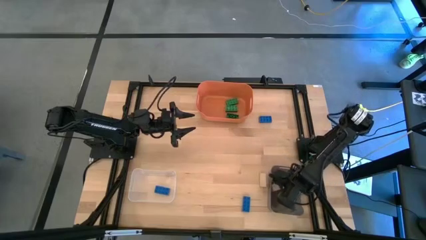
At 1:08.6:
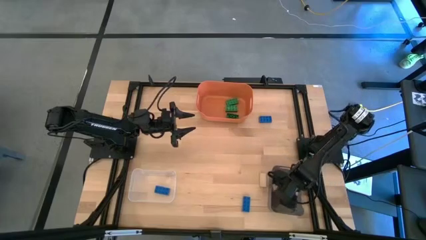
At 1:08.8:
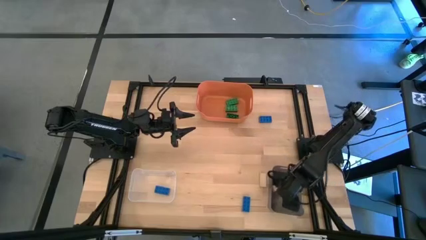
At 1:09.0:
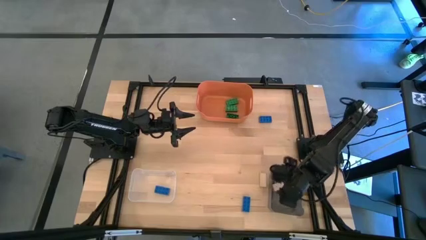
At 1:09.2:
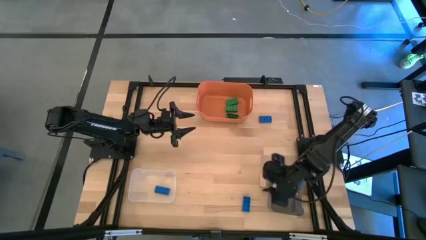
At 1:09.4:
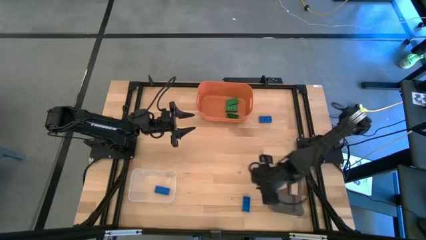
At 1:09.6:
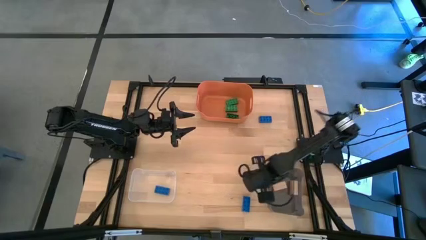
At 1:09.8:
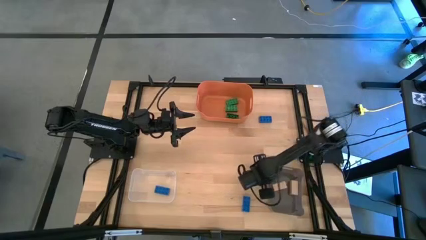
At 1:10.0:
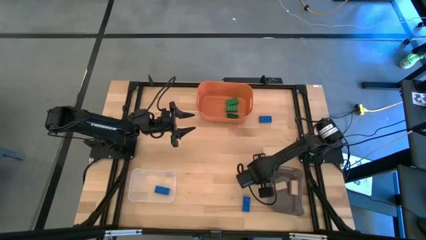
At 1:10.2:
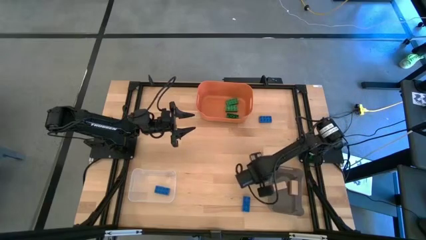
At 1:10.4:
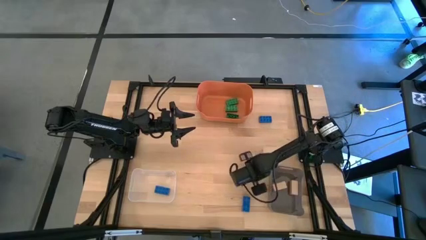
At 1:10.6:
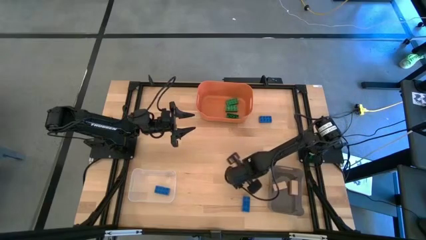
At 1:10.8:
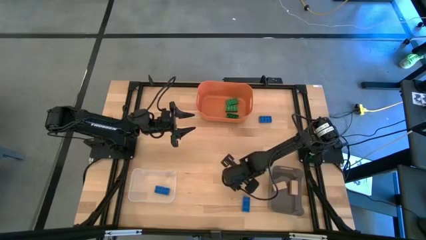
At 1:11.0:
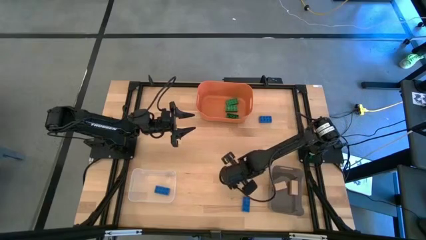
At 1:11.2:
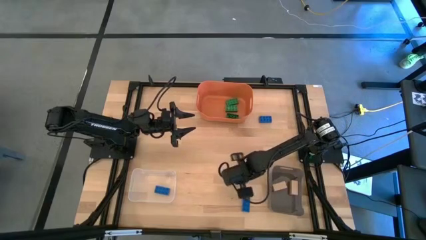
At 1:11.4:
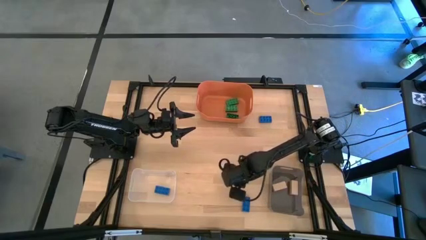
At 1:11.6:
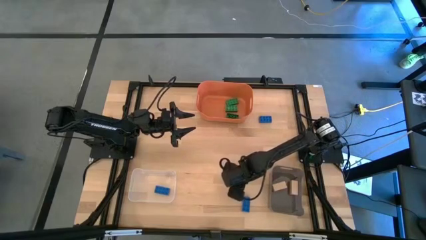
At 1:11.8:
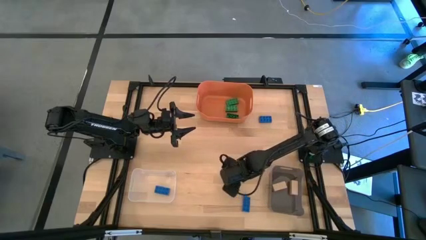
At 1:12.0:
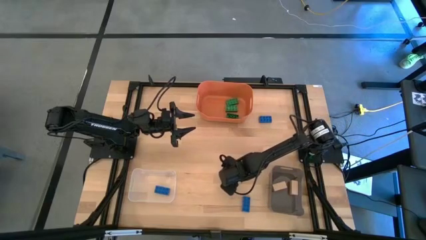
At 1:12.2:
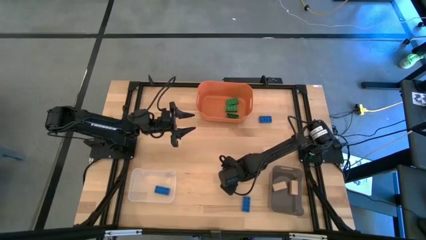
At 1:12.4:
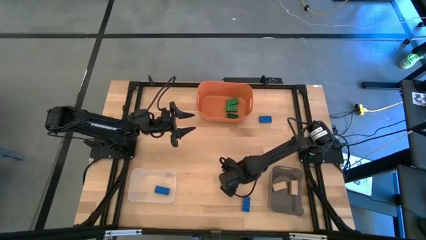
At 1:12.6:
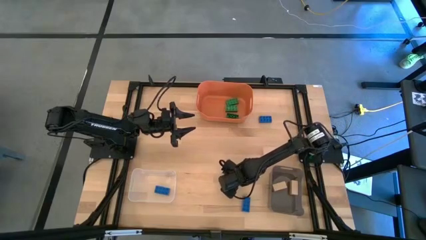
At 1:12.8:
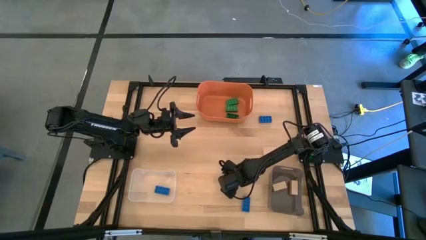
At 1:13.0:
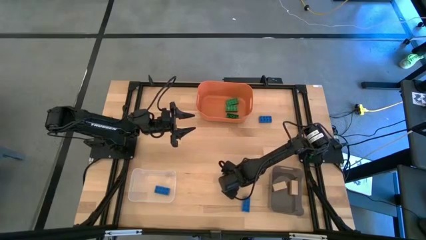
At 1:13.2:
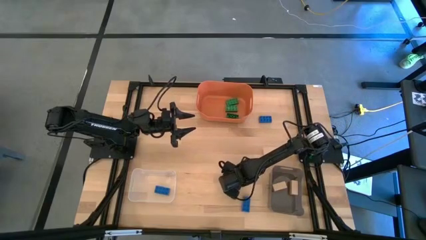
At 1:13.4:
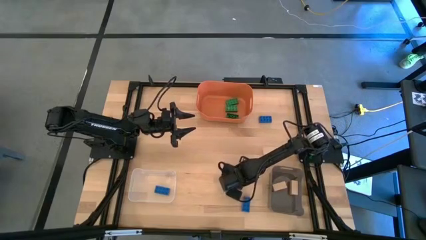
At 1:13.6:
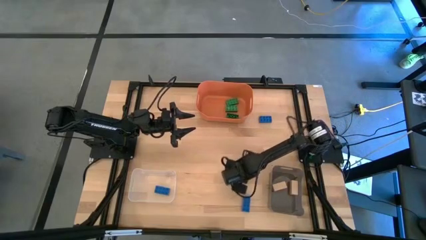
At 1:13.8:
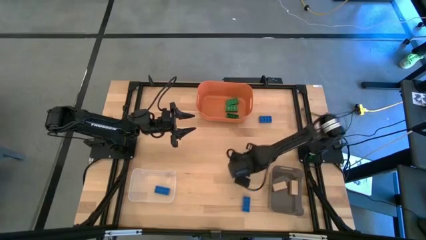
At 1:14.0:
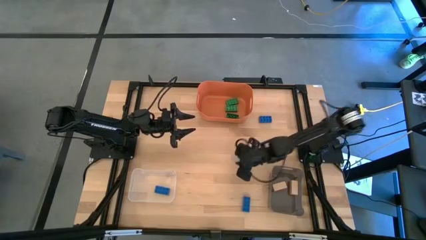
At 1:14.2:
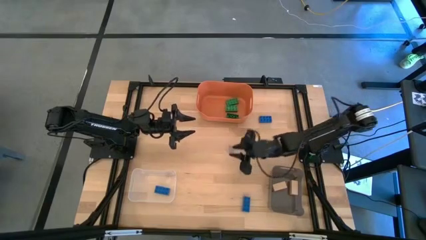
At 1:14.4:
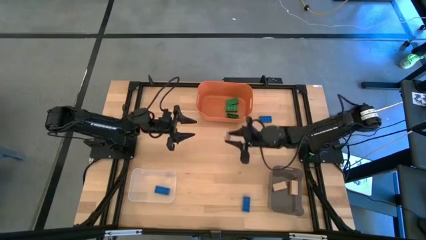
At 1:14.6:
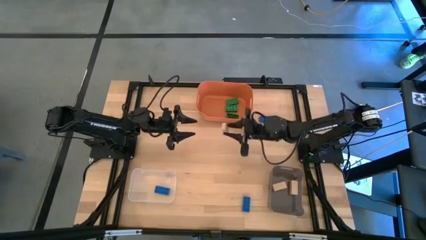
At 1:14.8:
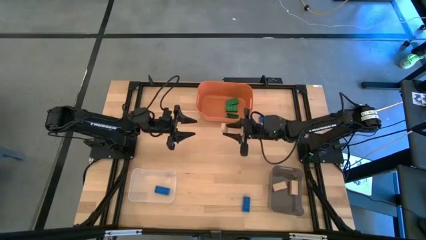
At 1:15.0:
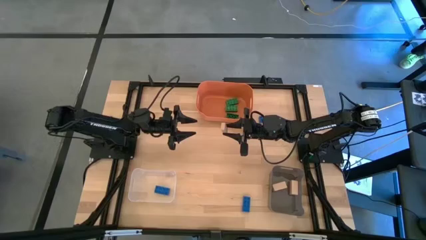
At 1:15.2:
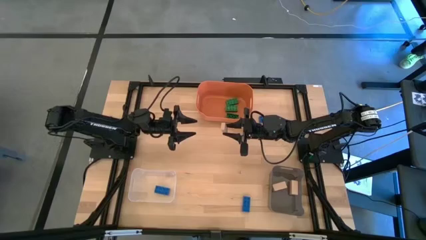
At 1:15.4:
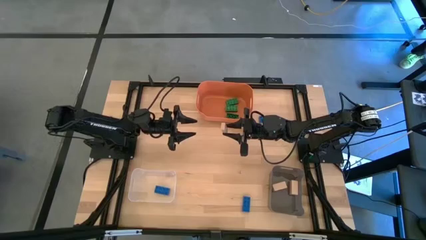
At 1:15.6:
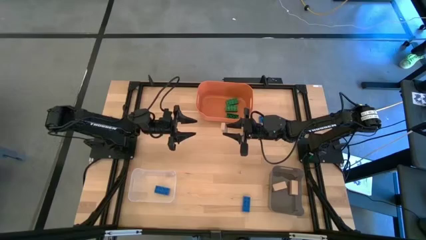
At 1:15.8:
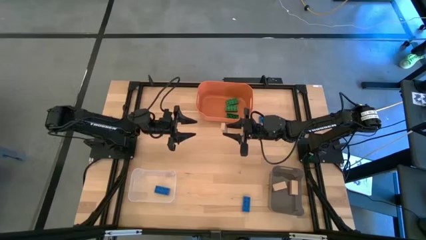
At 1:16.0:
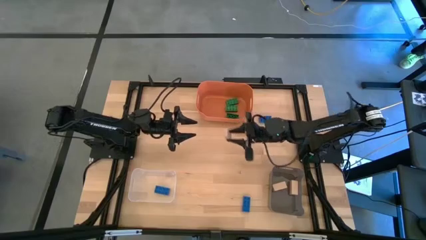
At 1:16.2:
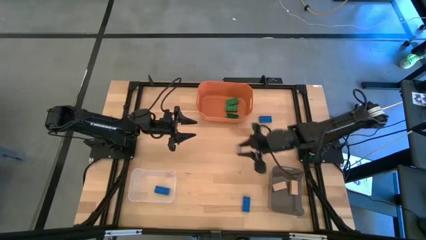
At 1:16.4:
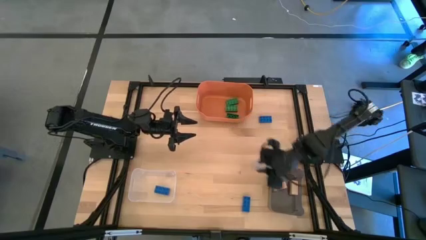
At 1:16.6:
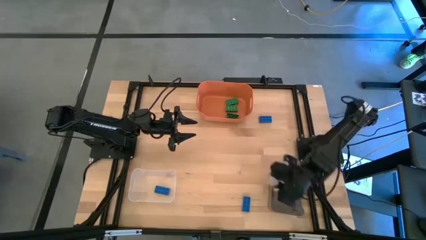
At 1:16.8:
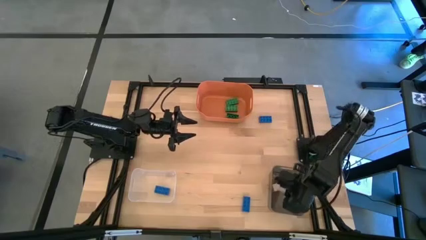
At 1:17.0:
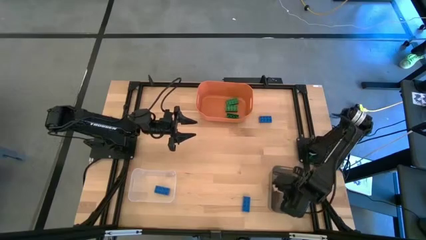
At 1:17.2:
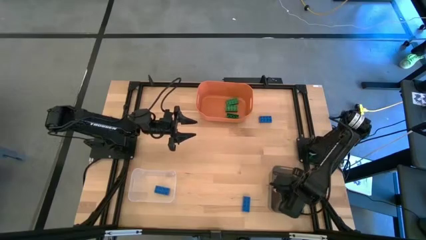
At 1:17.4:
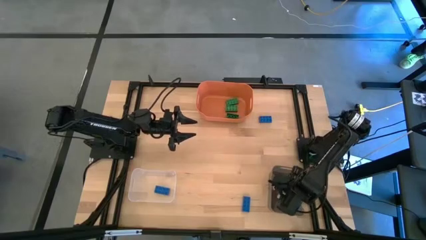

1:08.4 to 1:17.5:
Task: Sort & place blocks by color
Put the brown block into the black transparent bin

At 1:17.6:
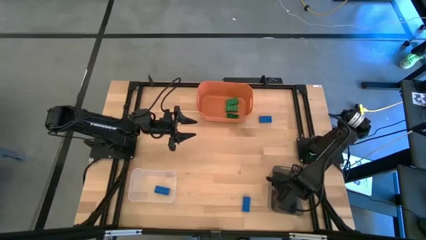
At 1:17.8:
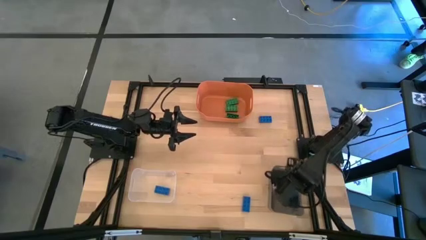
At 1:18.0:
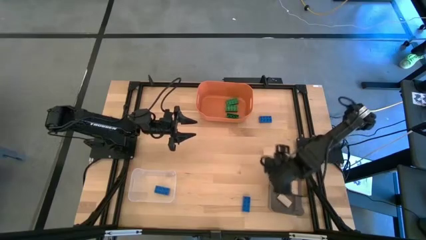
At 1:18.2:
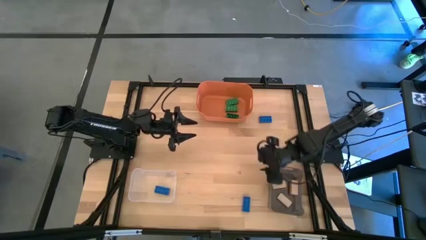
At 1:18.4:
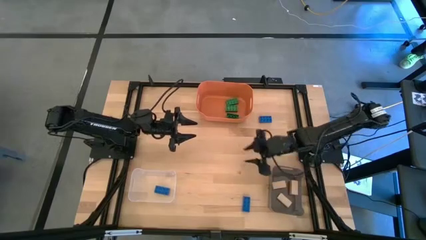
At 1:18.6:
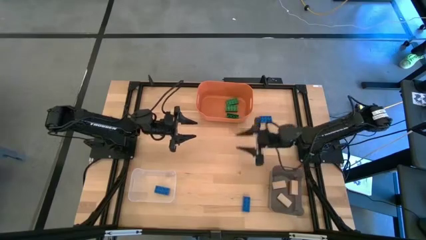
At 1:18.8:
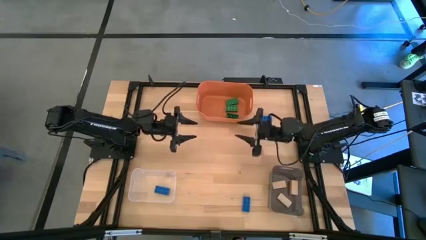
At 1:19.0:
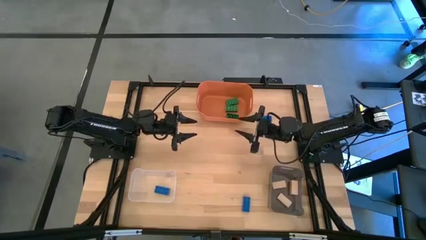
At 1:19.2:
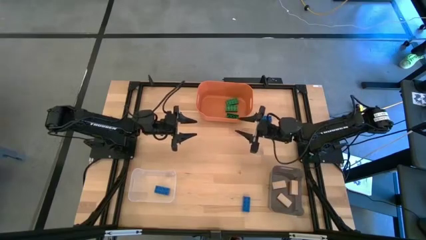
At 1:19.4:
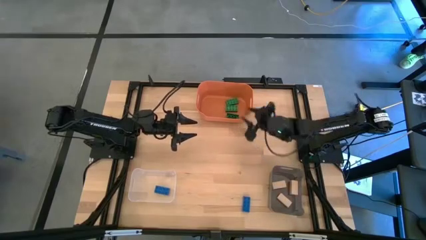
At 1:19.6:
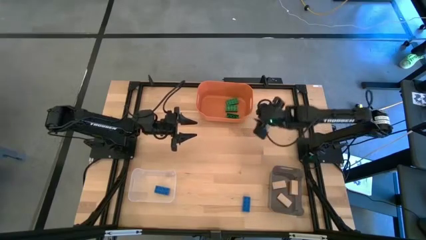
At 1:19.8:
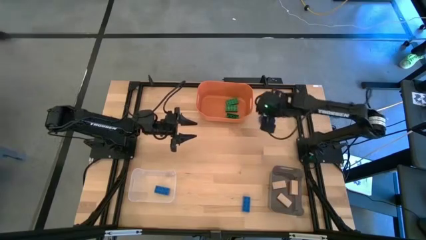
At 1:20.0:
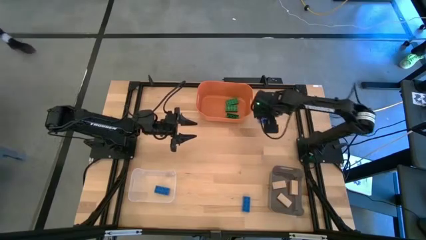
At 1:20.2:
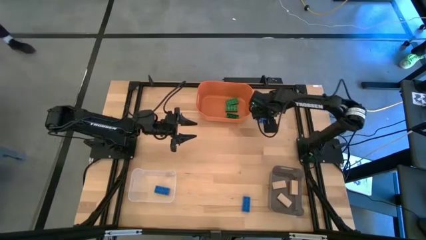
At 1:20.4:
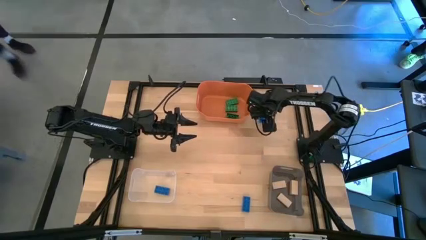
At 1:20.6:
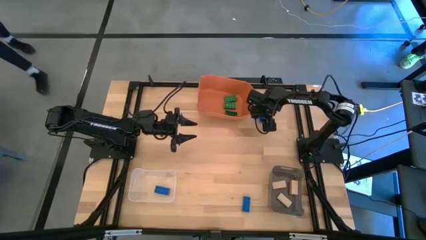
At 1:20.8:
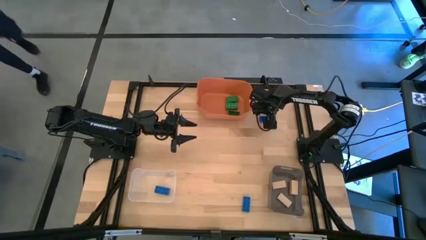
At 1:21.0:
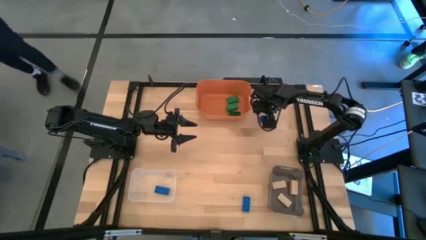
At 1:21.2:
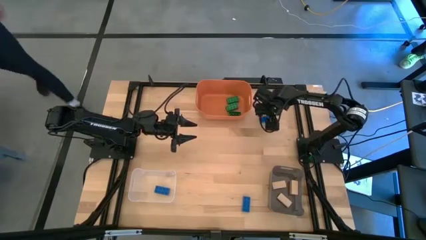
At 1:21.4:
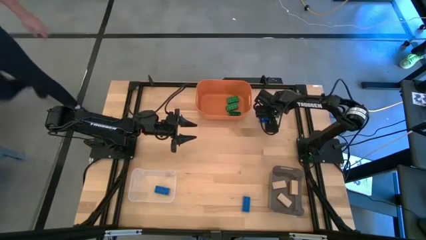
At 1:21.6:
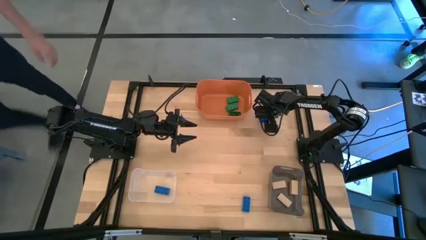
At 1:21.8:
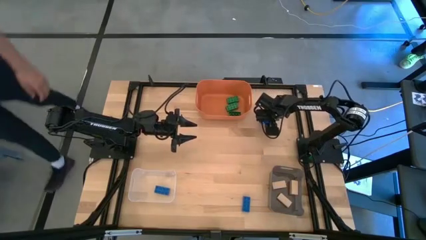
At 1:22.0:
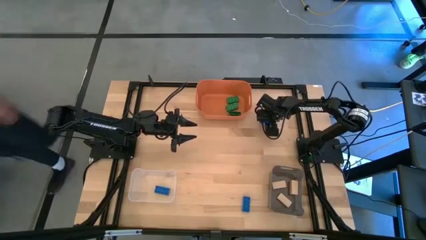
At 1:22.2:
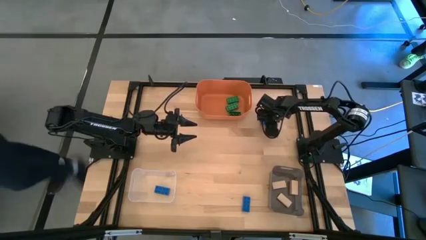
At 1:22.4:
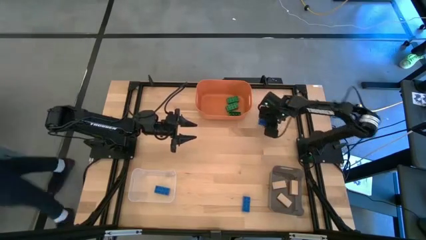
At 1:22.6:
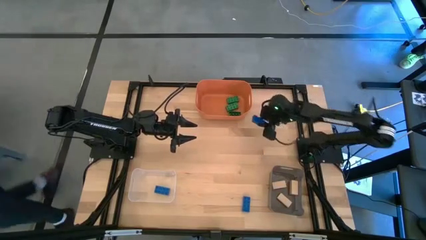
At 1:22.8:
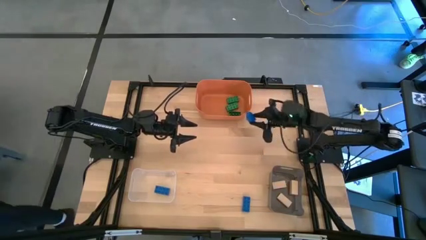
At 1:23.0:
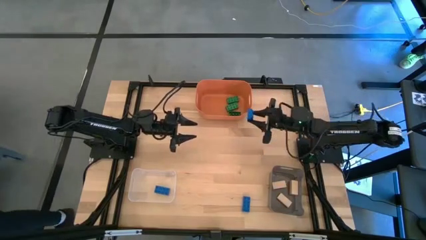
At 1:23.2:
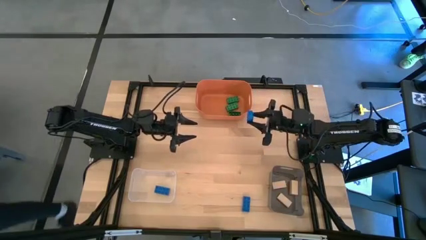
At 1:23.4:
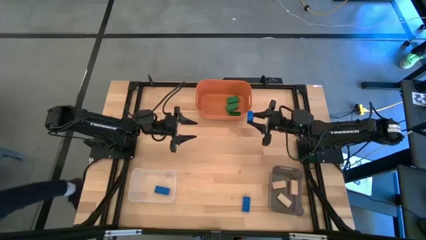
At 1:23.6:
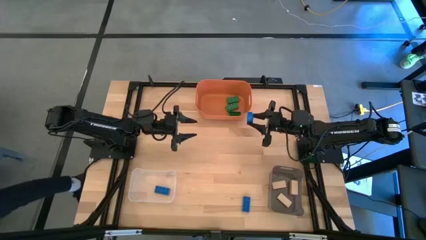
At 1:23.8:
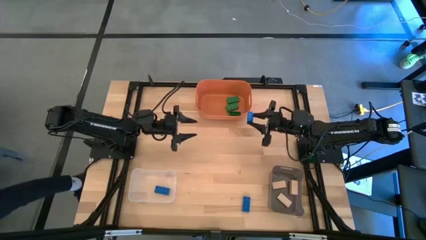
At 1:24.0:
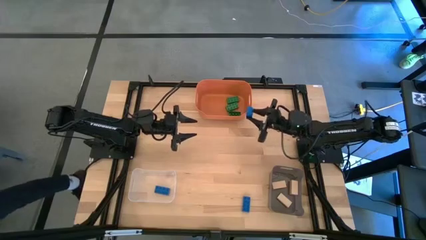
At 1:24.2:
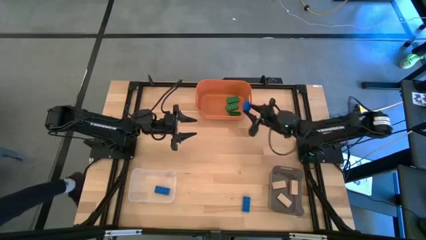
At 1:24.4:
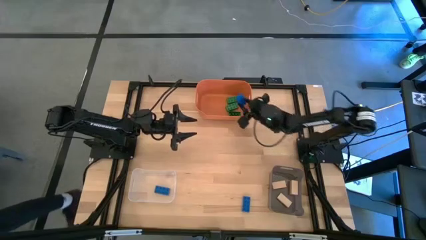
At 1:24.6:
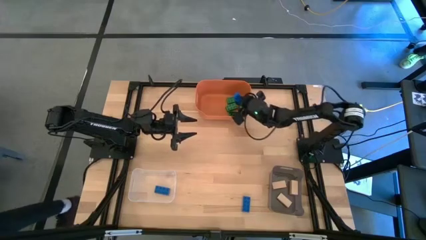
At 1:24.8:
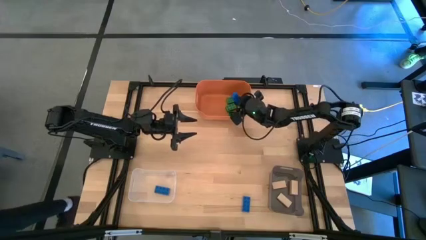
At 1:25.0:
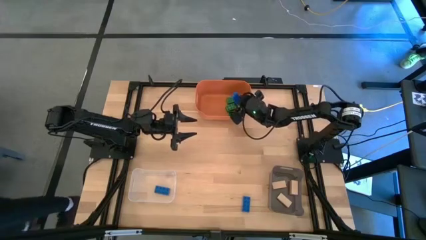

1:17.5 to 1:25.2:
Put the top blue 8 stud game piece into the white transparent bin
